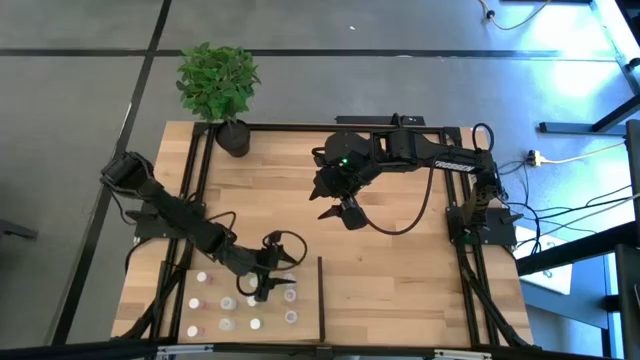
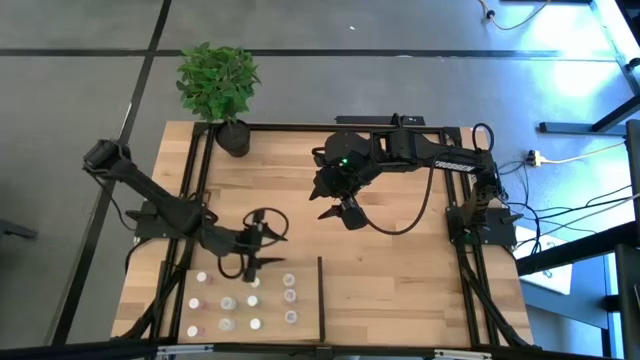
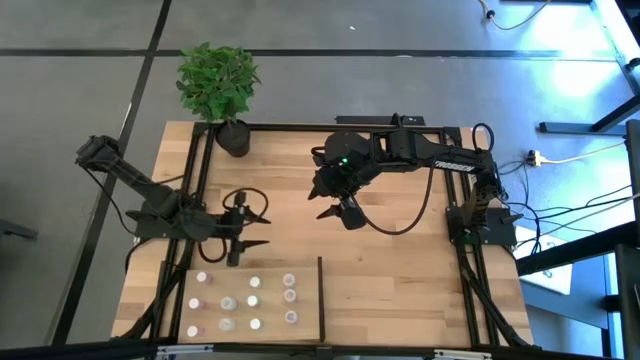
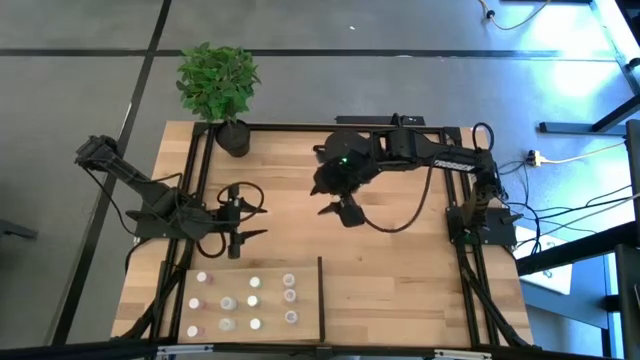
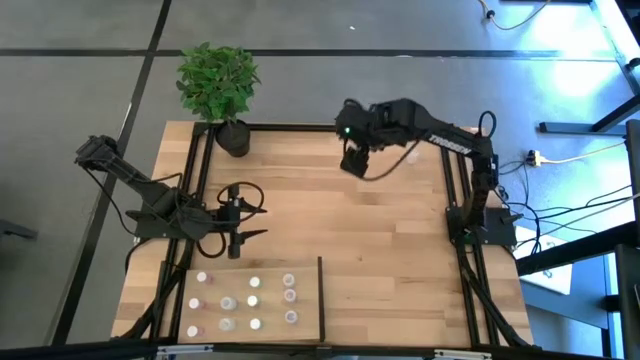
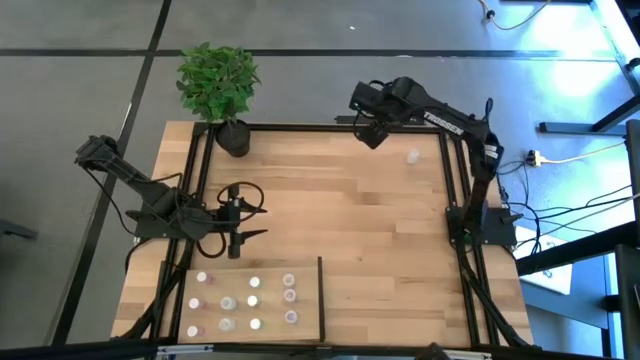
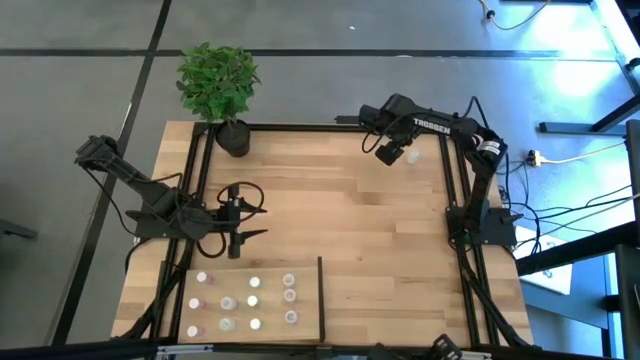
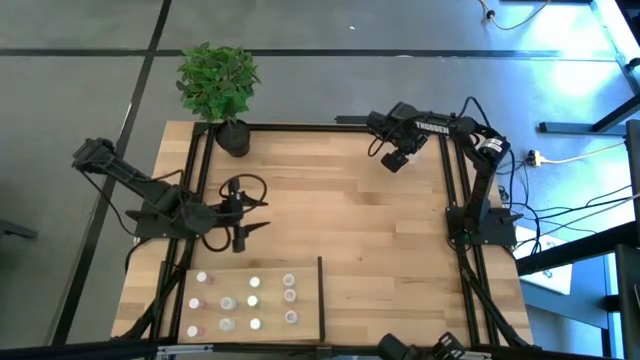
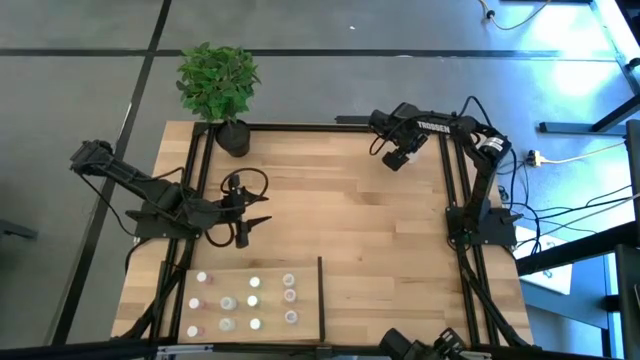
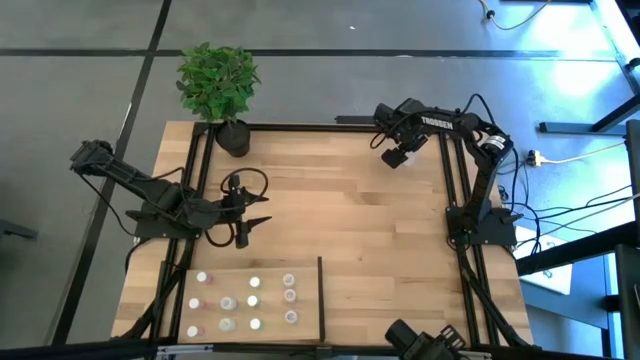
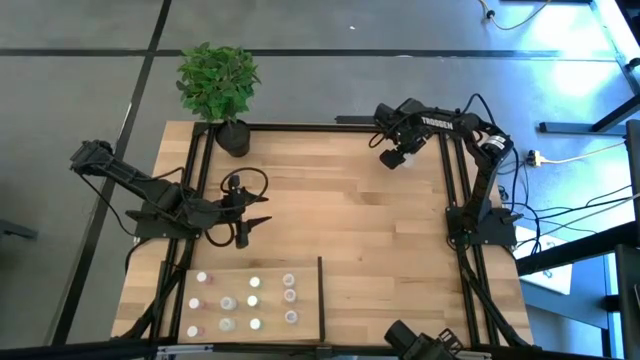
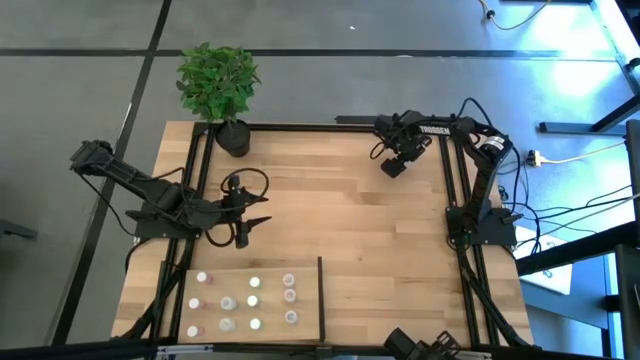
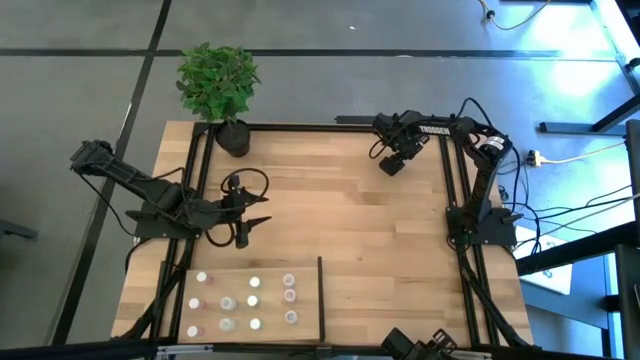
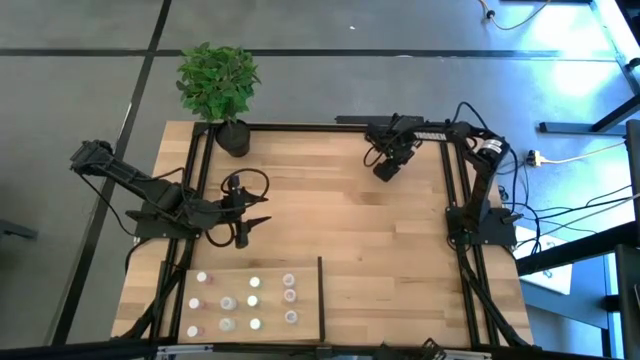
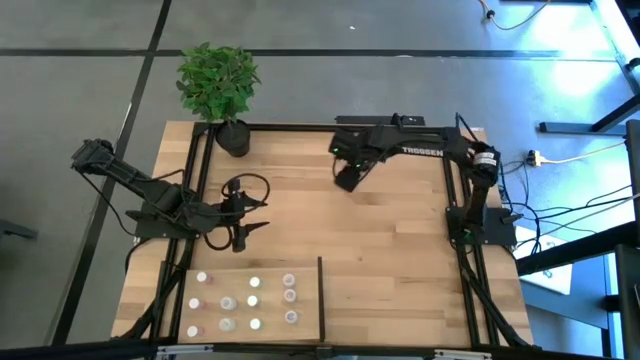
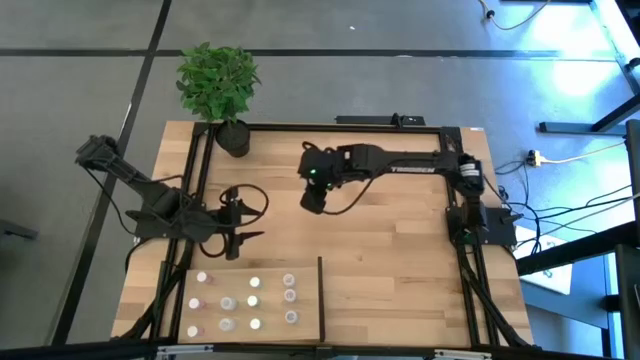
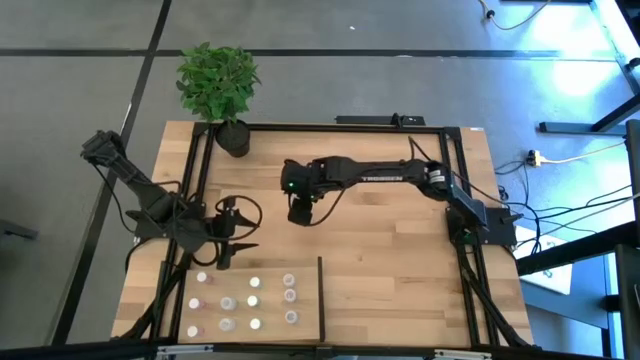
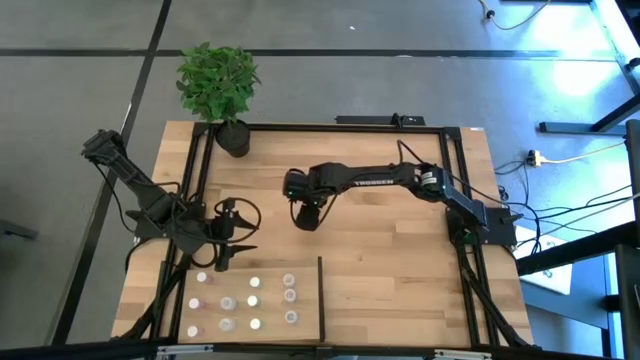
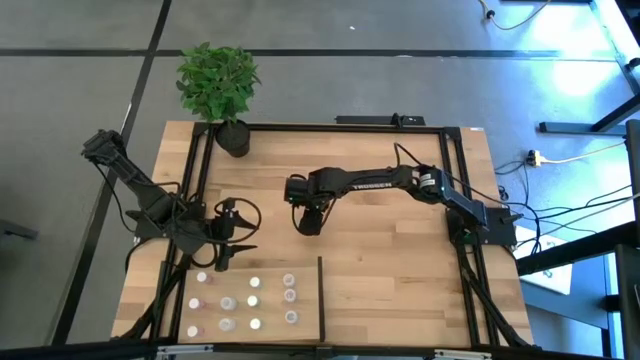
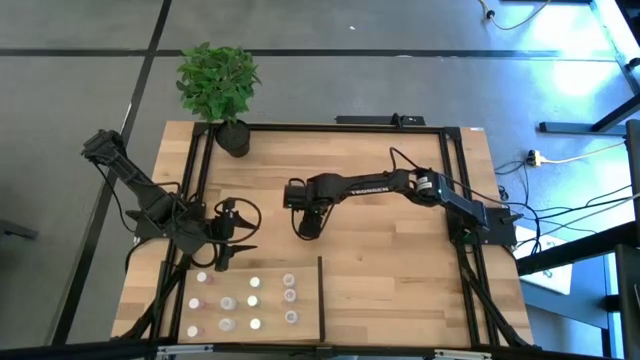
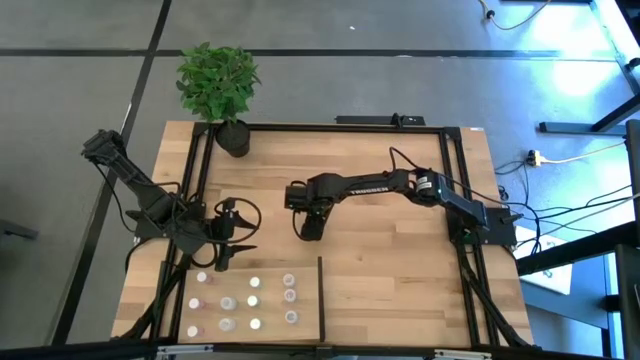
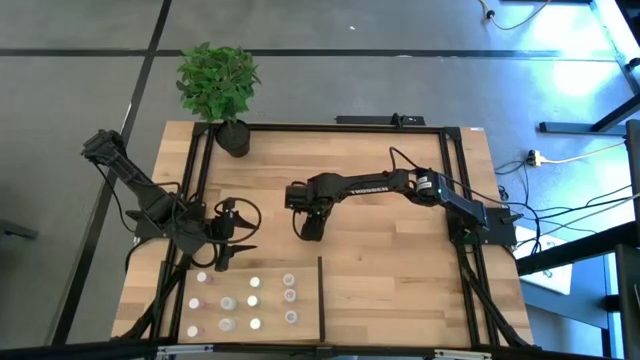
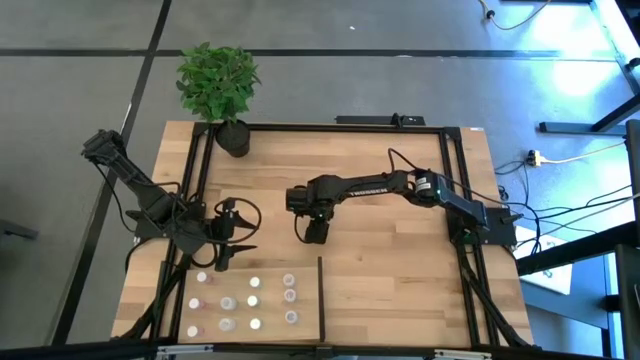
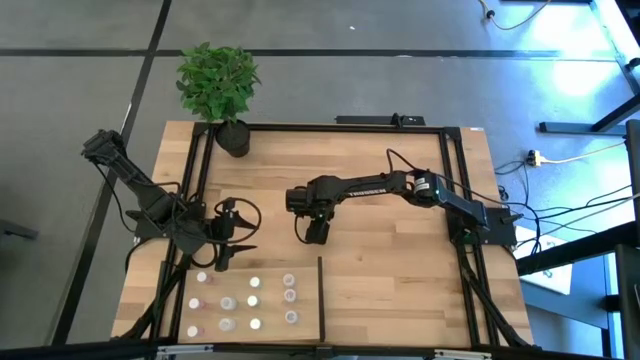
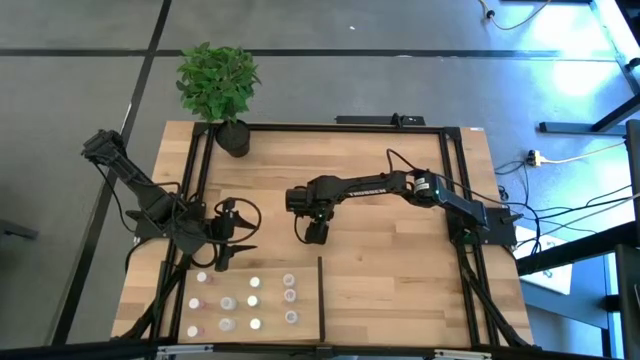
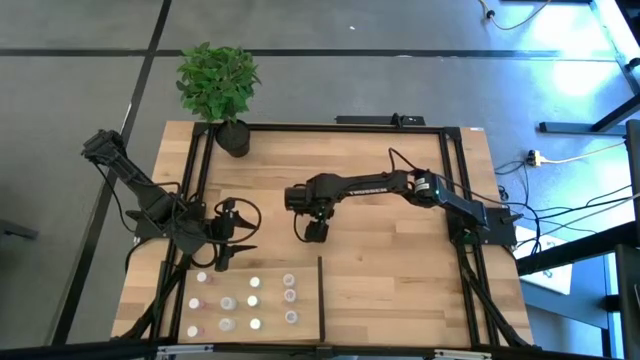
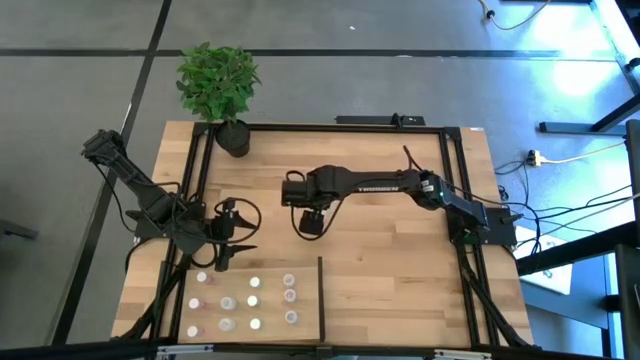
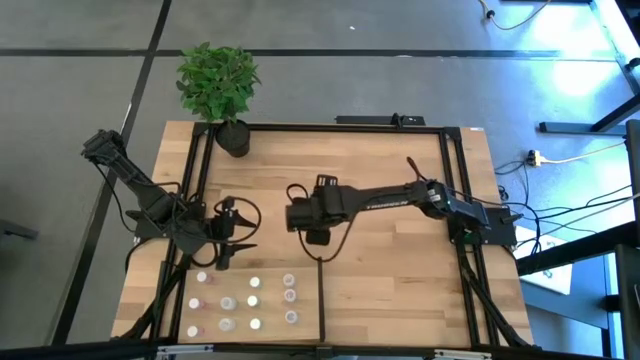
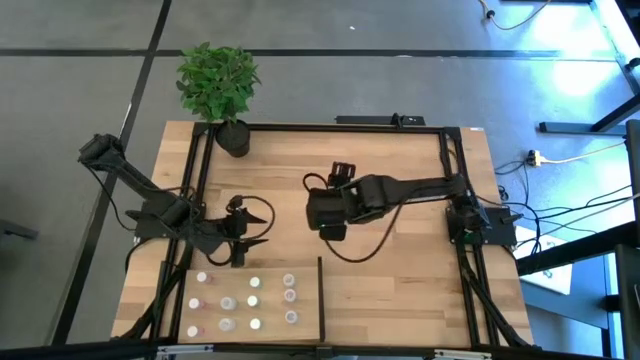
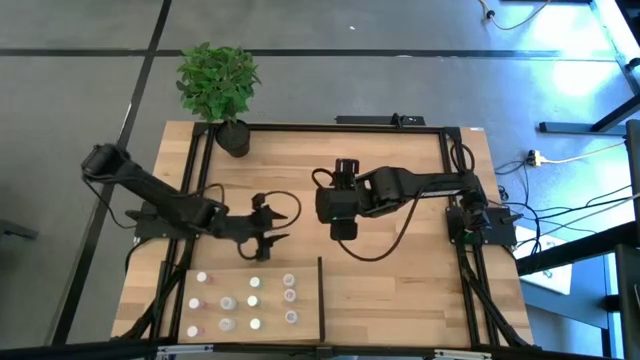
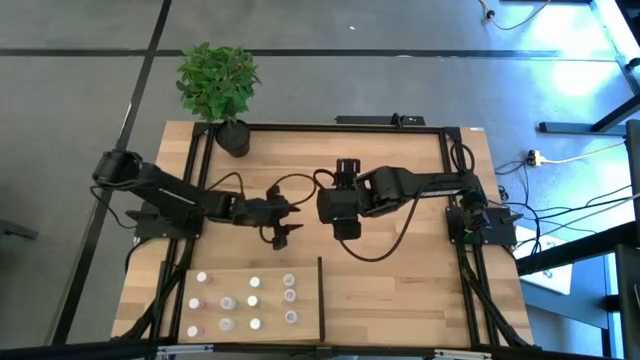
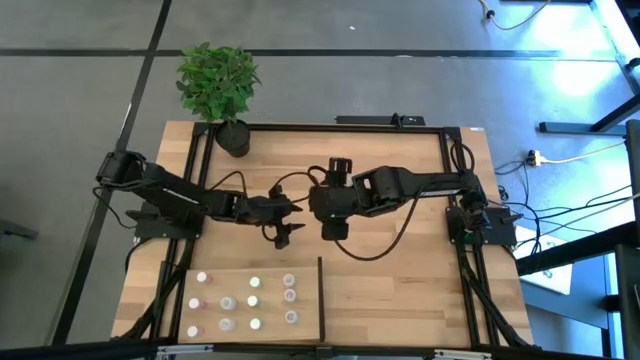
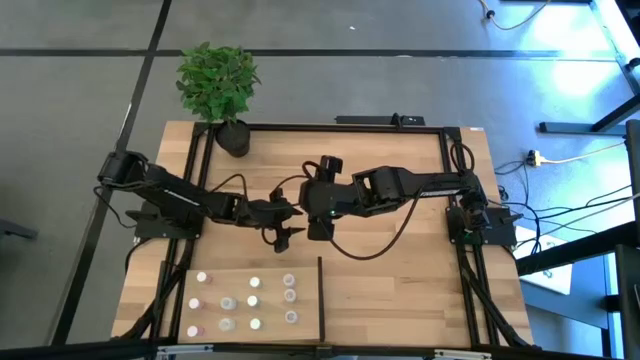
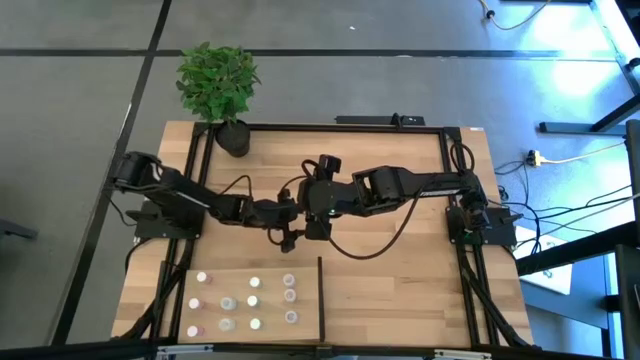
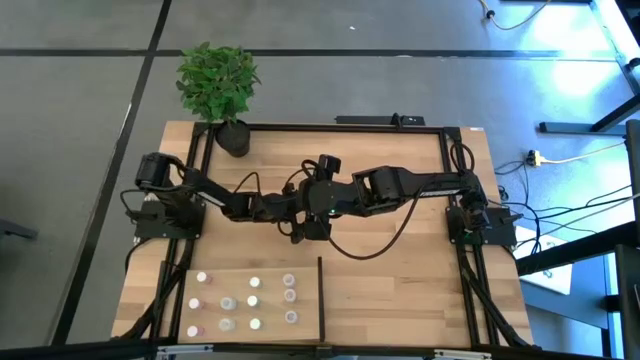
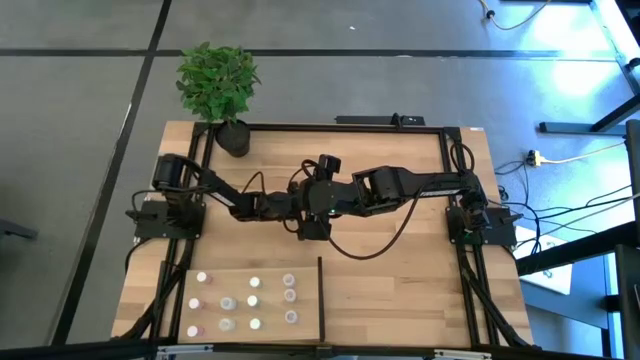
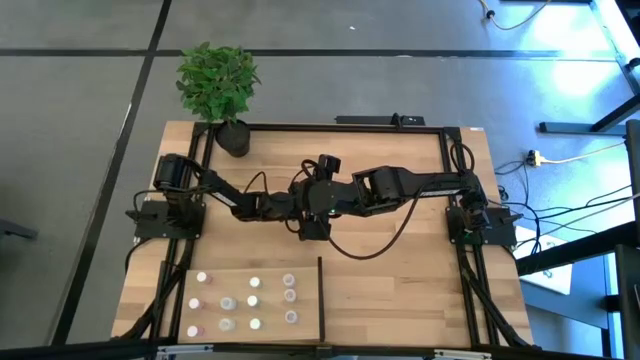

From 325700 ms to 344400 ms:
Task: Pick and place medicine bottles onto shelf by color
Put the white pill bottle on the shelf aligned with the other white pill bottles

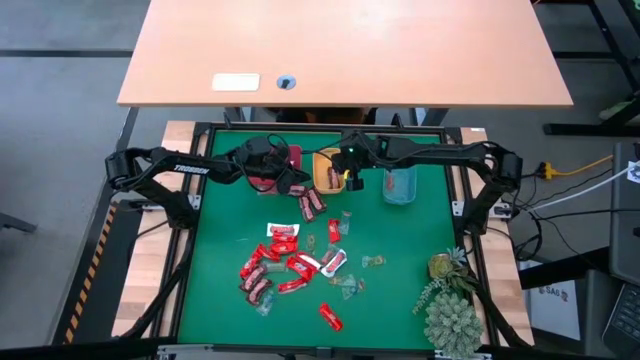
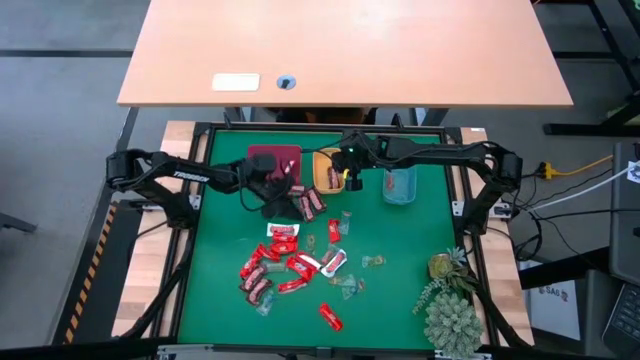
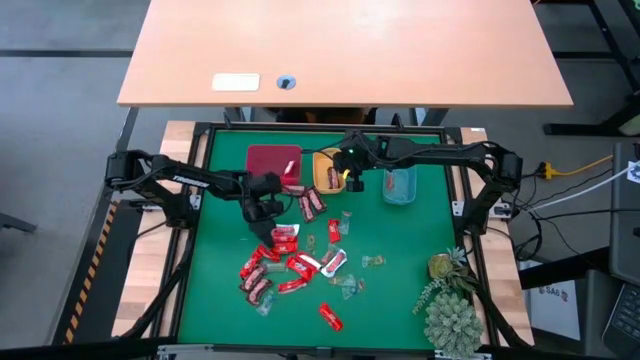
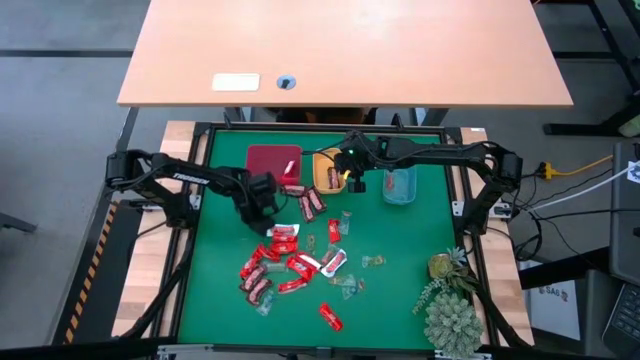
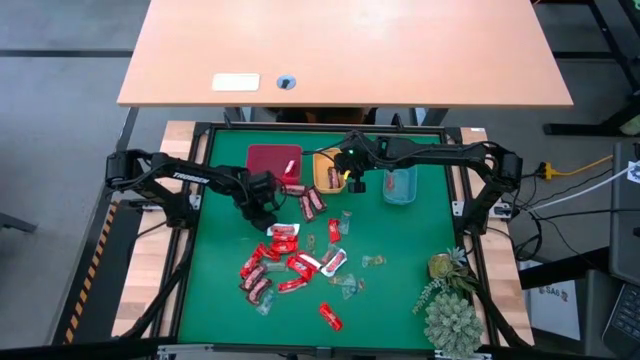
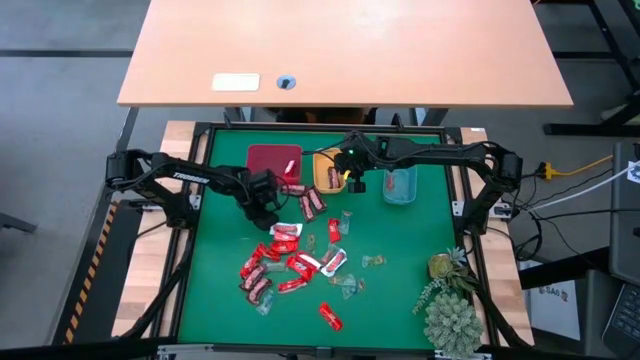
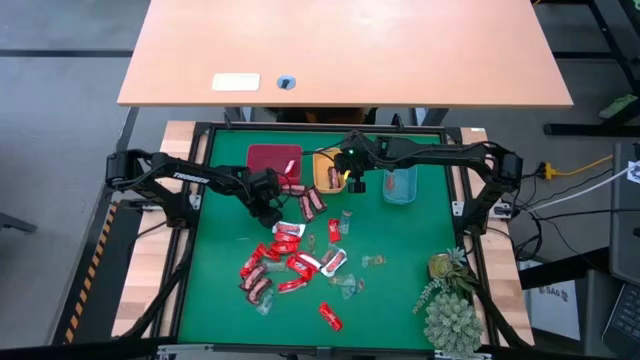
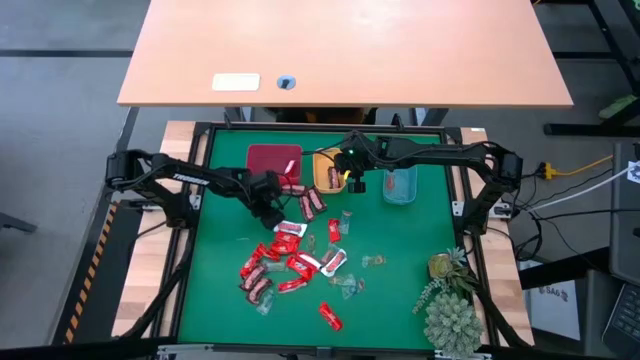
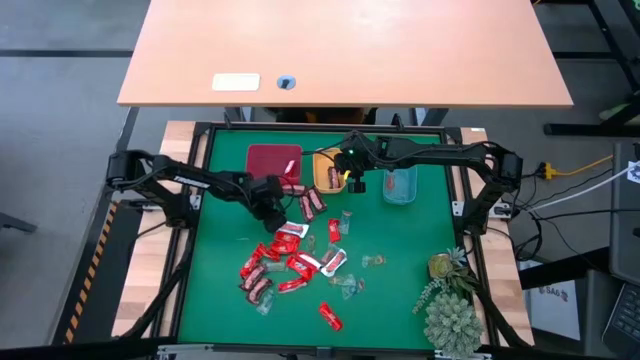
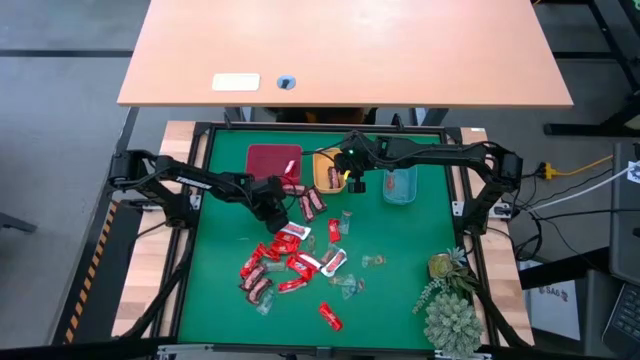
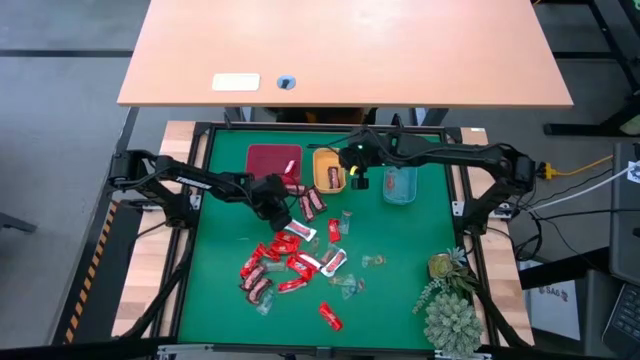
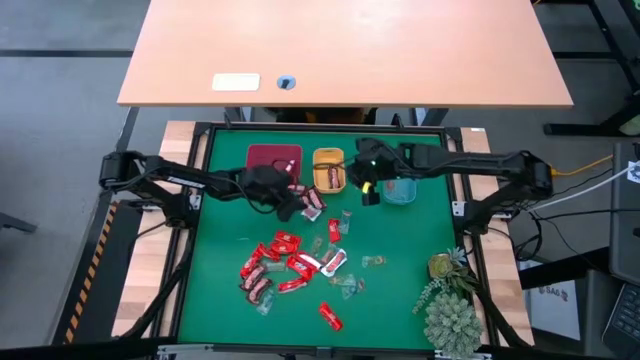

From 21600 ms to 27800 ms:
Task: Sort candy
Put the white chocolate bar into the yellow bin
